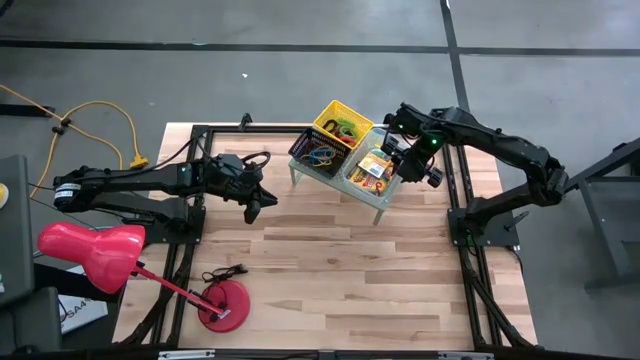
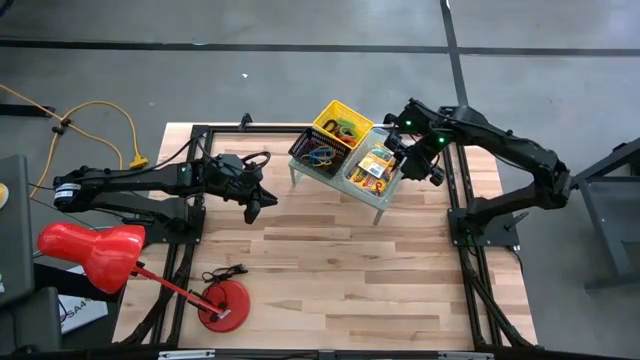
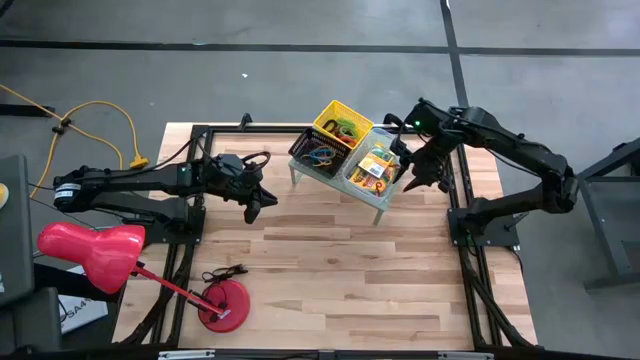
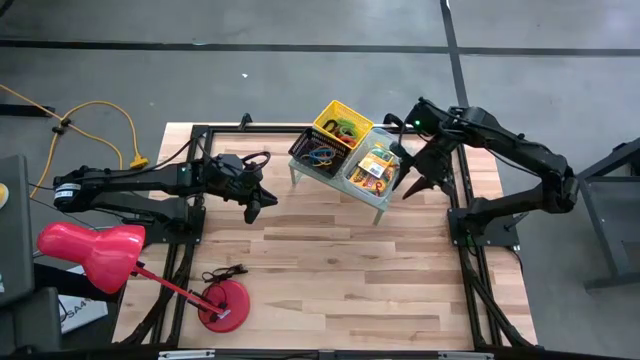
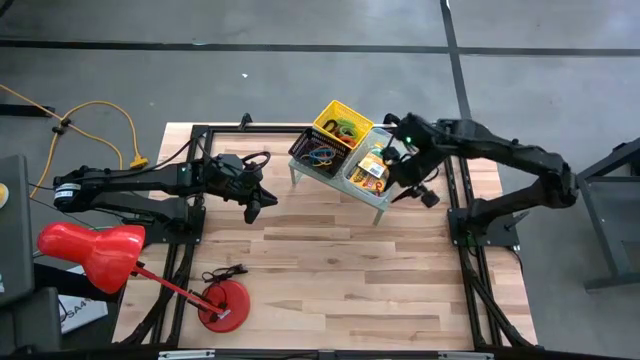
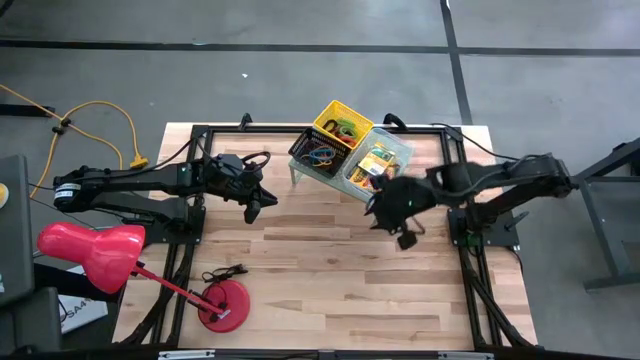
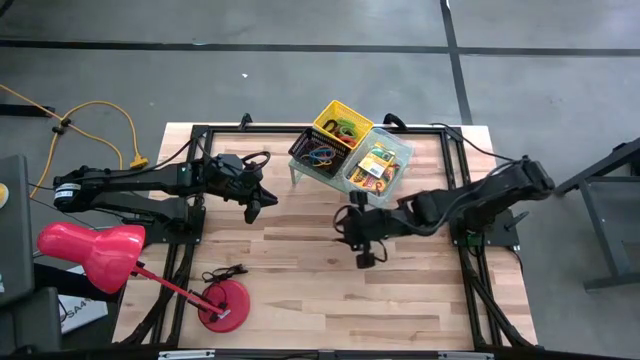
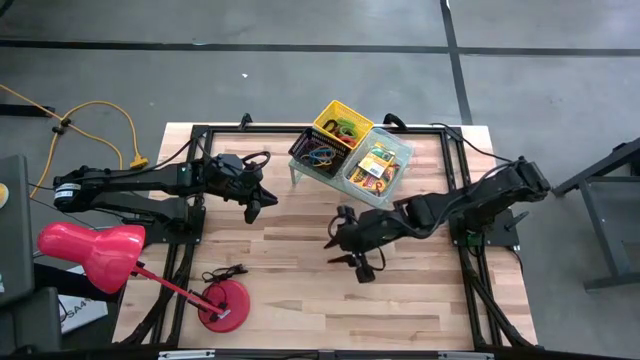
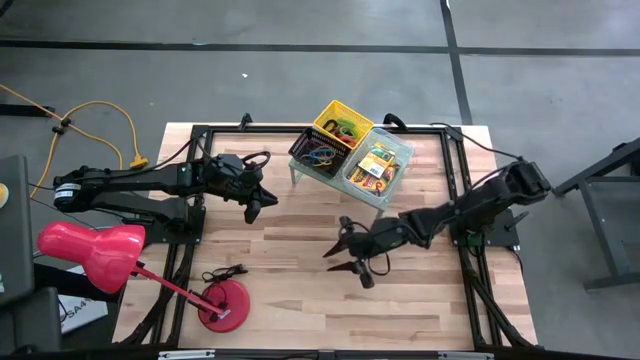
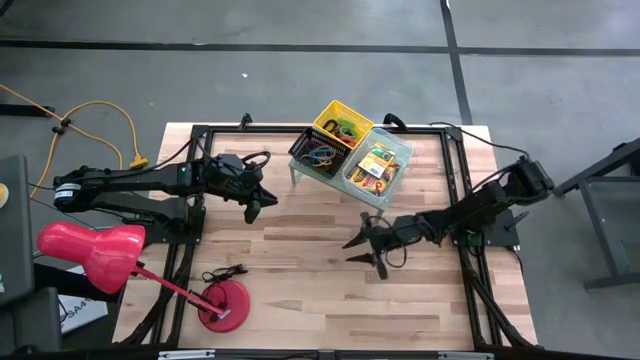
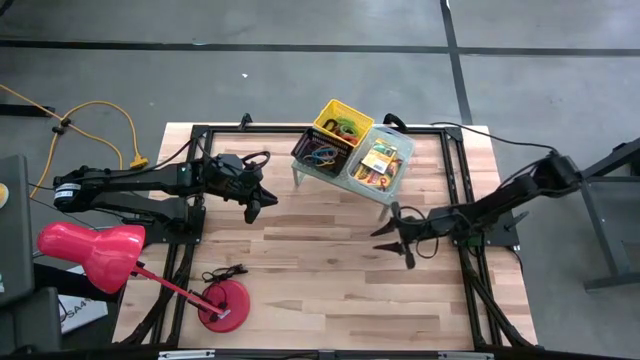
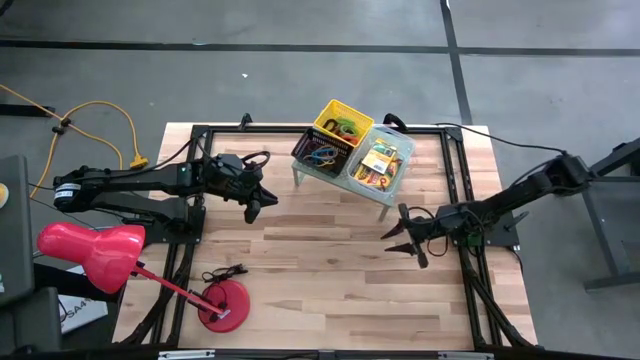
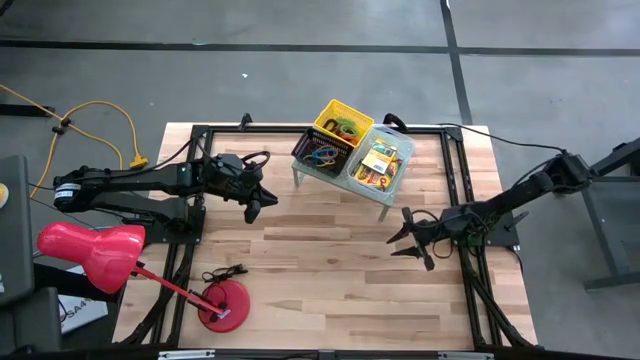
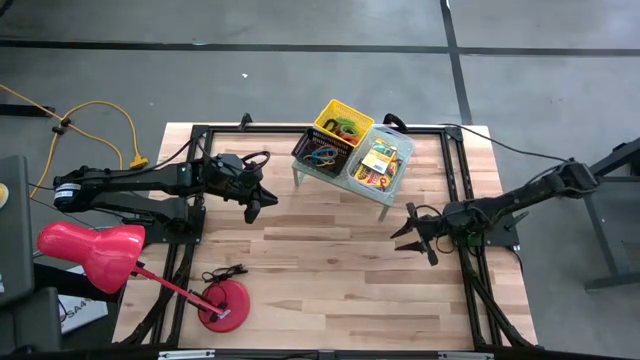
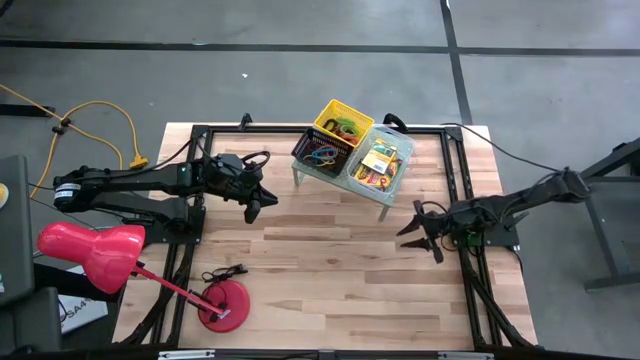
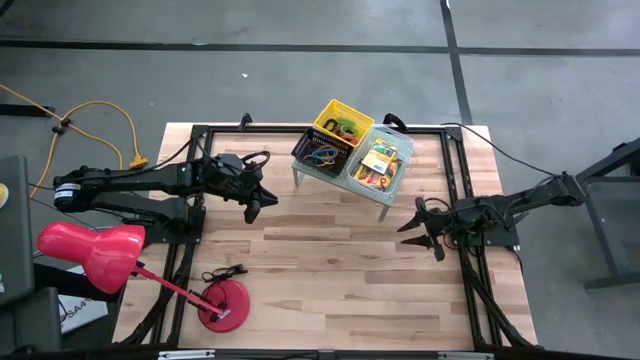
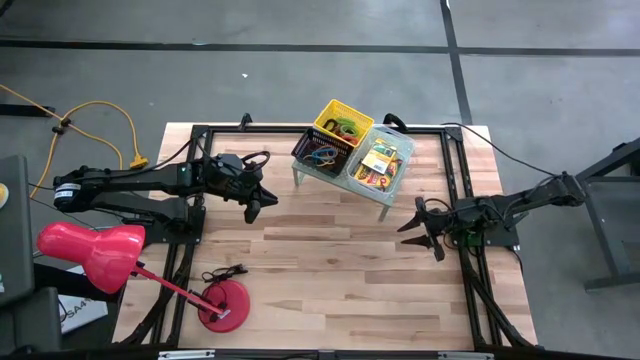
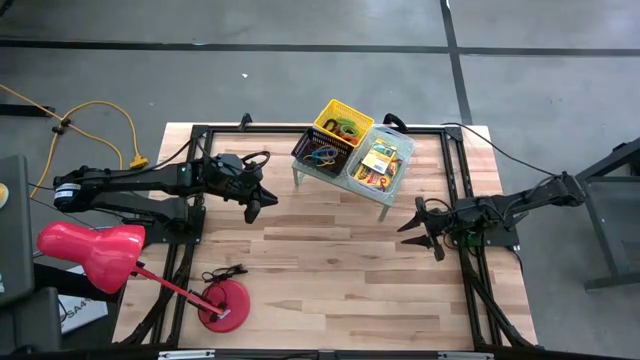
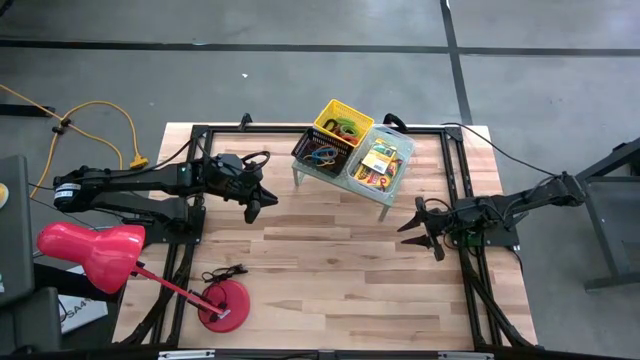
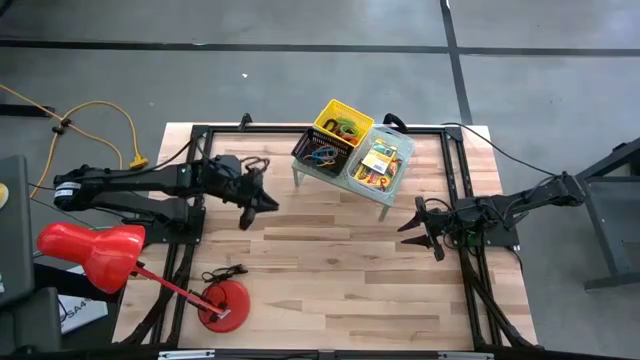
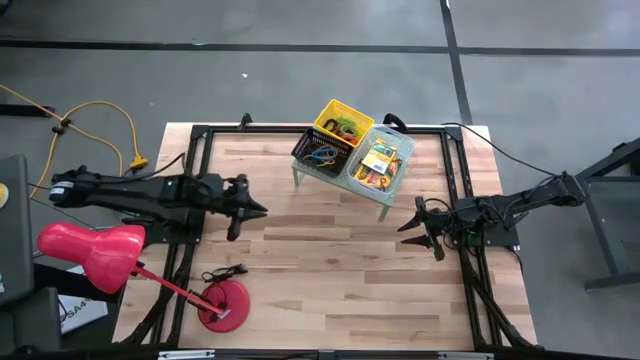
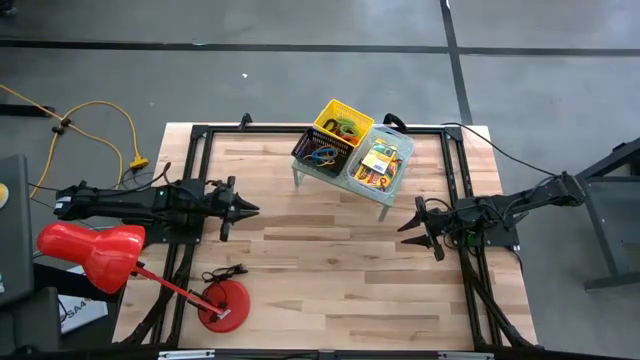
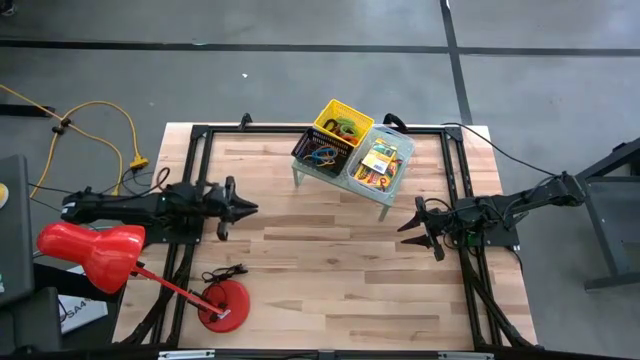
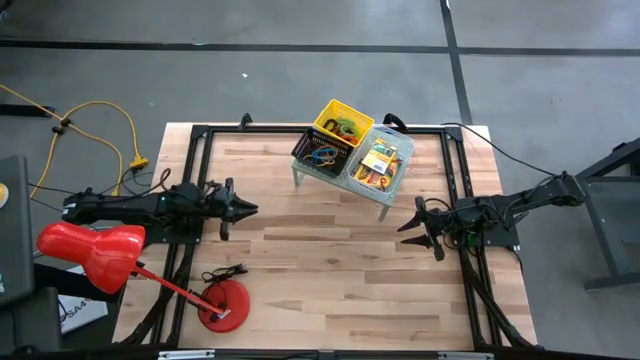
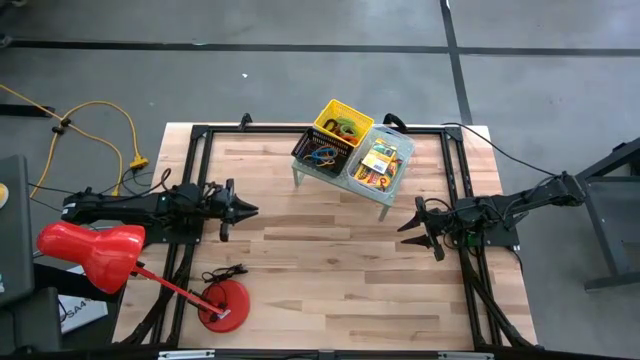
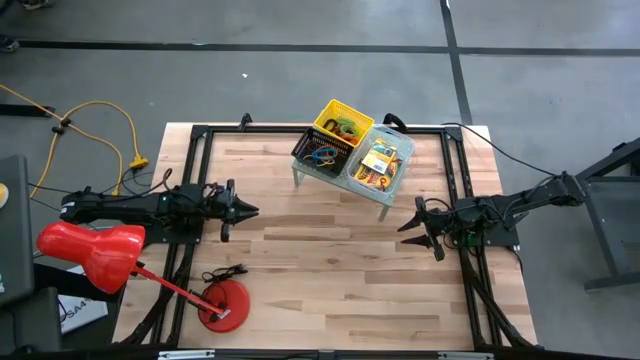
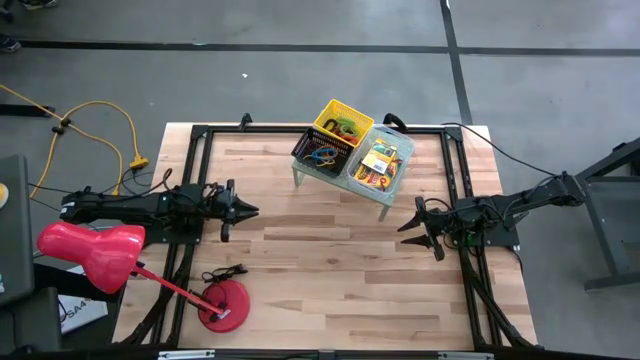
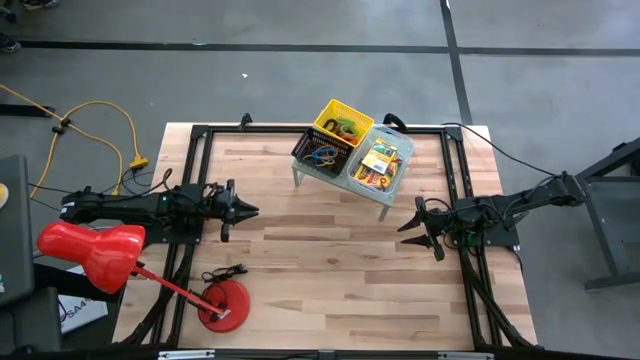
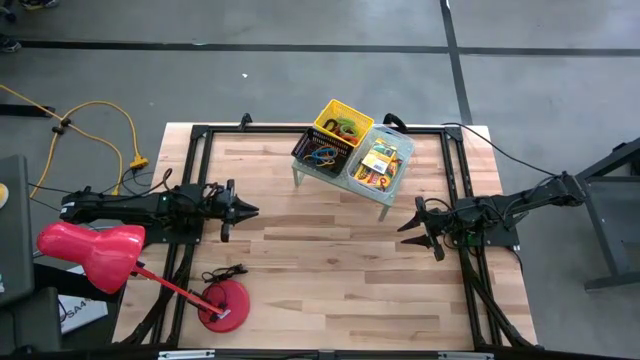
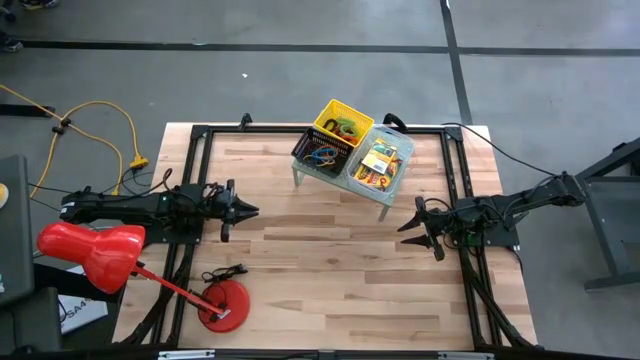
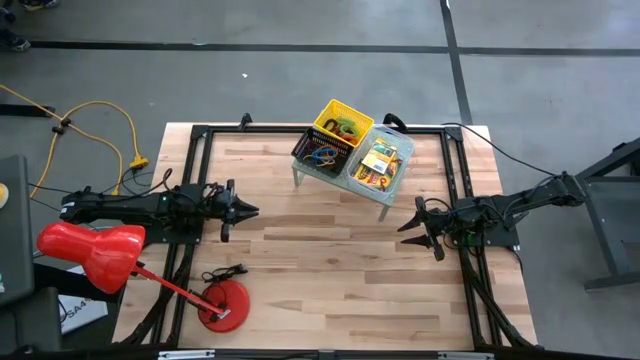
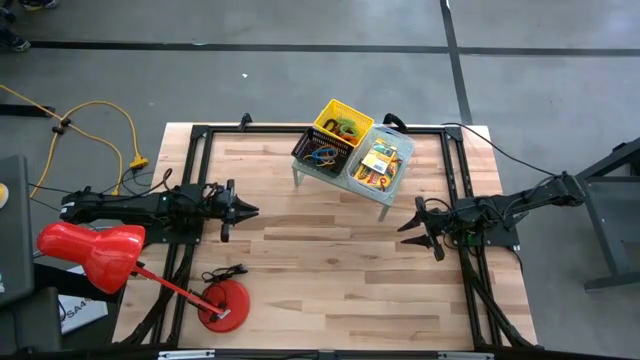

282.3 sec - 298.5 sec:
Task: Pick & Place Office Desk Supplies
Return to Home Position

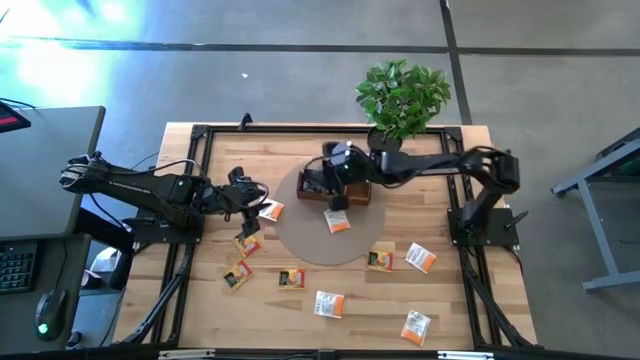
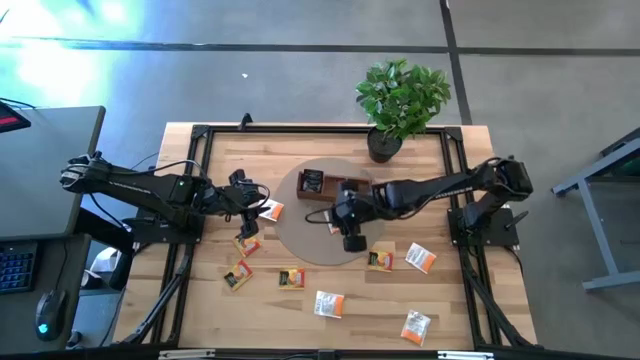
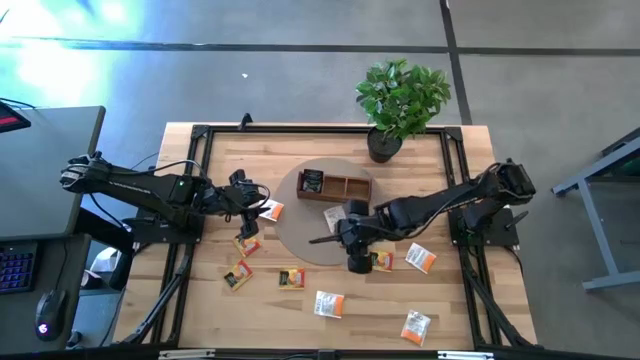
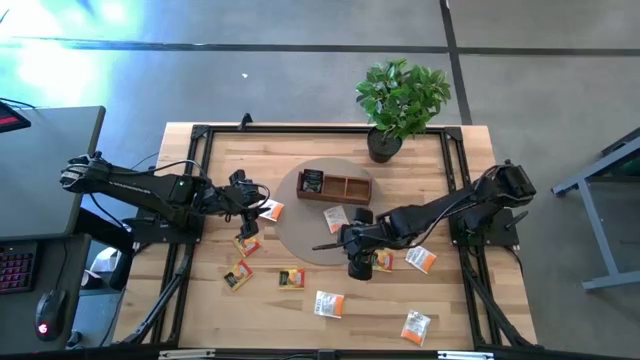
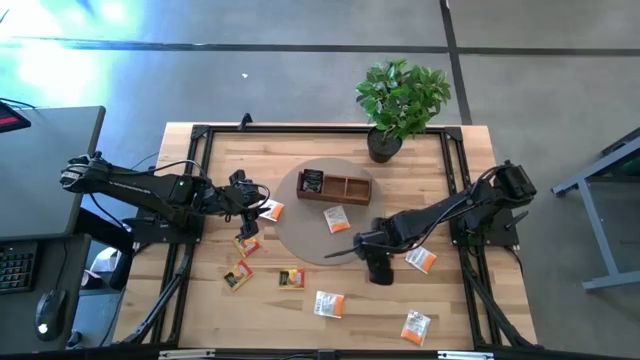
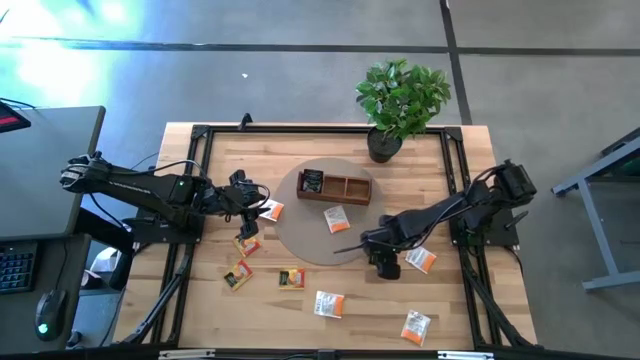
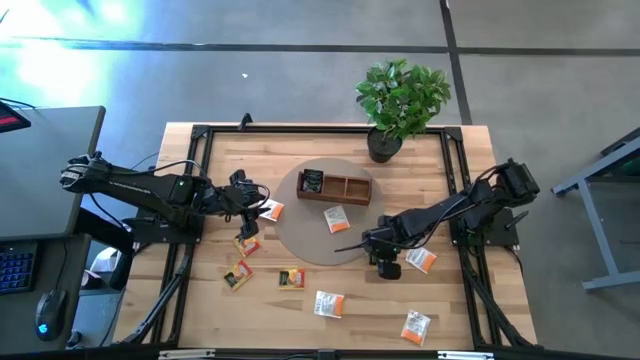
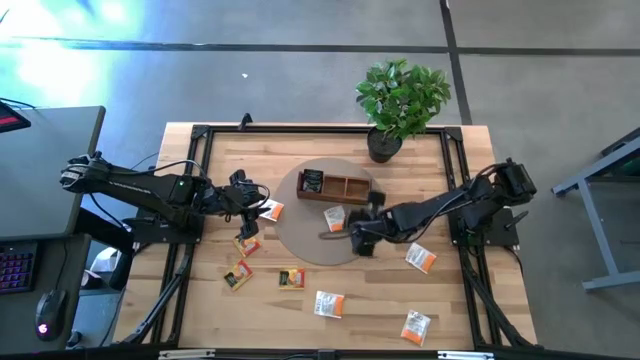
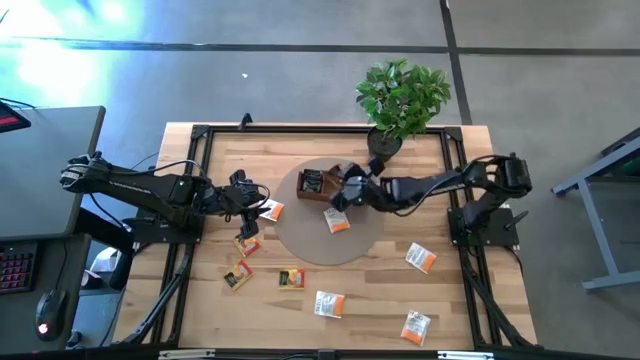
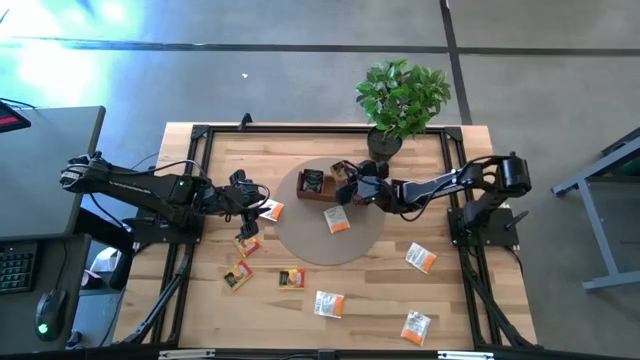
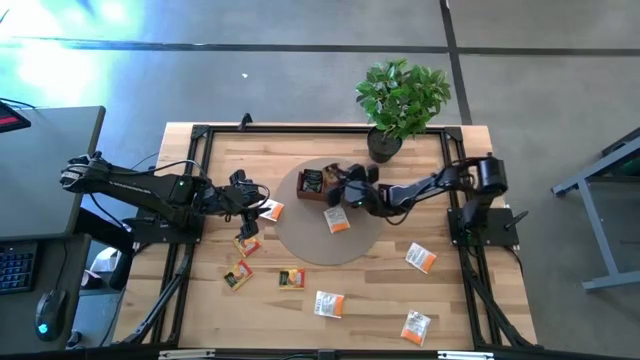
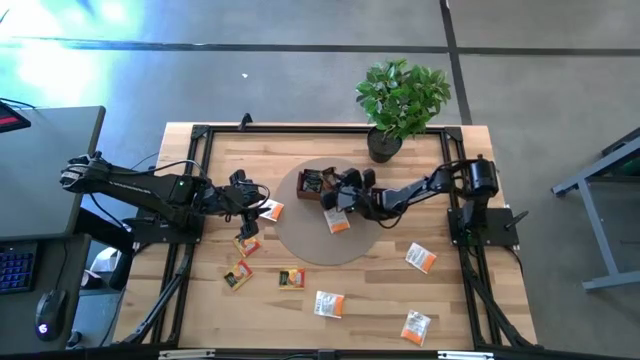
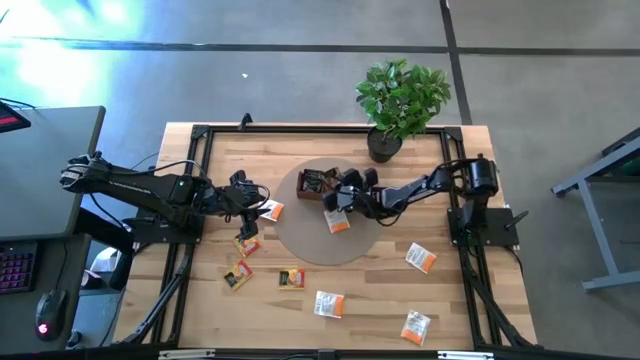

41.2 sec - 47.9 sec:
Task: Pick & Place Tea
Put the orange tea bag into the middle area of the wooden organizer

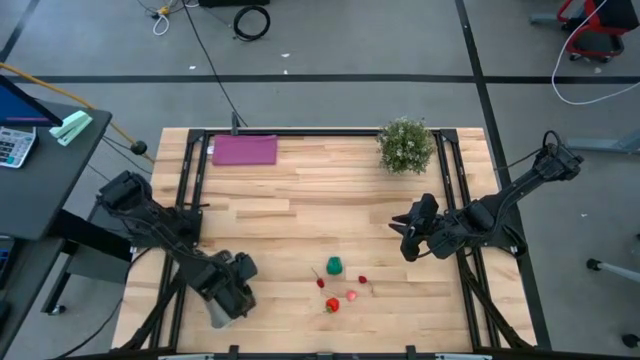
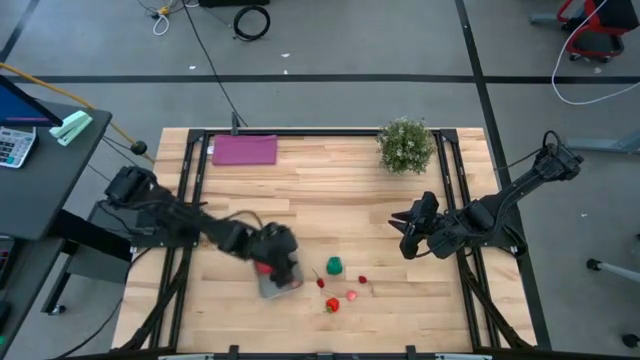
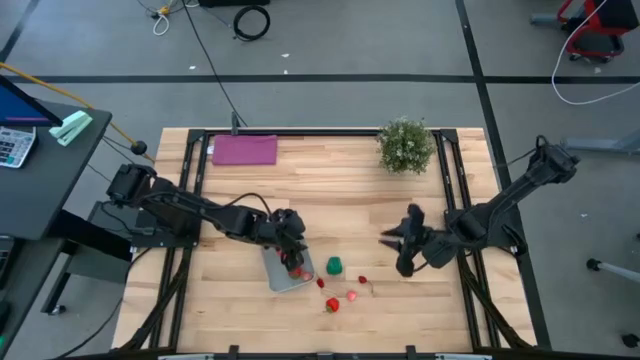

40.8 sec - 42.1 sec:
Task: Pick and placing Produce into tupperware
Move the gray bin to the middle of the table
